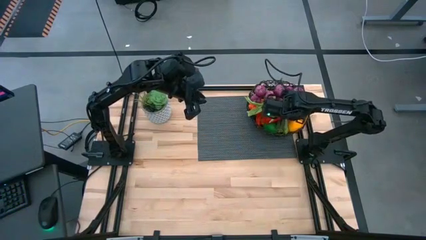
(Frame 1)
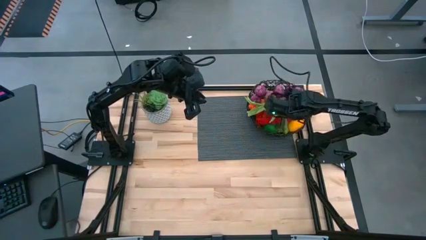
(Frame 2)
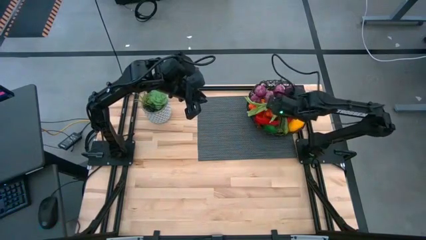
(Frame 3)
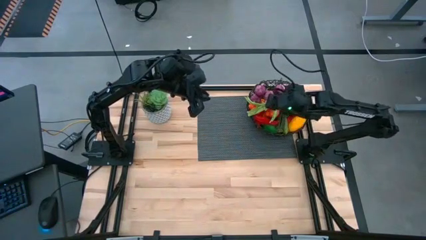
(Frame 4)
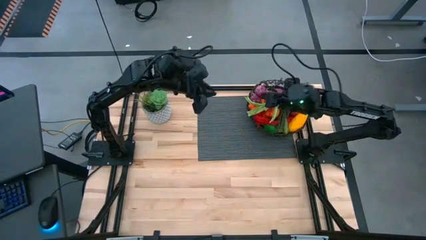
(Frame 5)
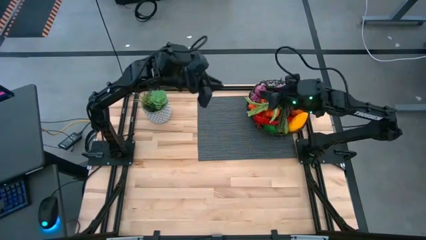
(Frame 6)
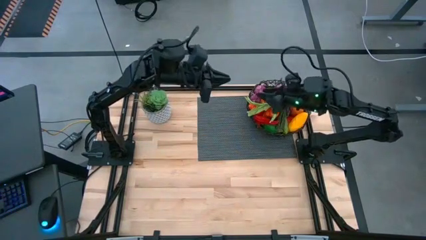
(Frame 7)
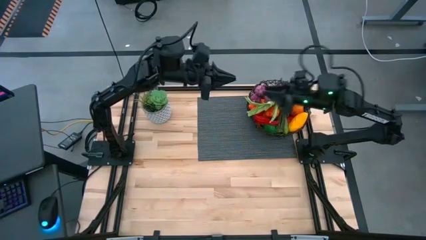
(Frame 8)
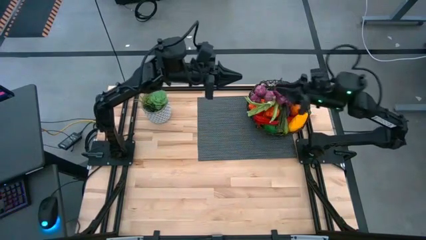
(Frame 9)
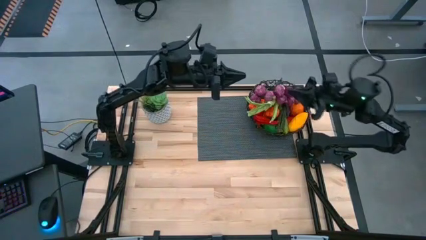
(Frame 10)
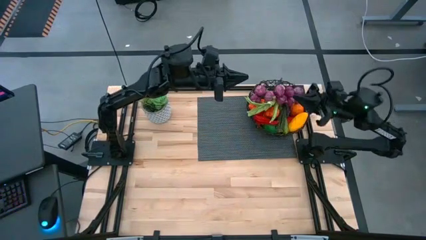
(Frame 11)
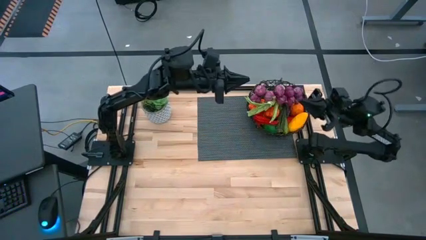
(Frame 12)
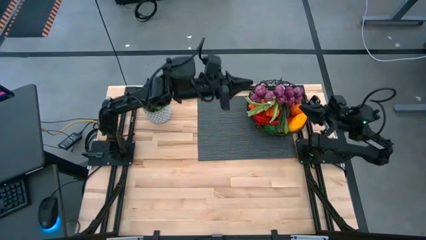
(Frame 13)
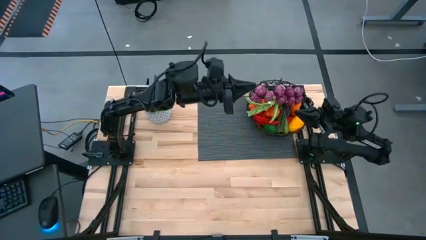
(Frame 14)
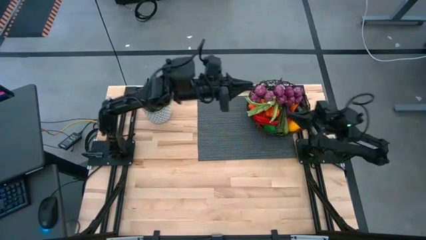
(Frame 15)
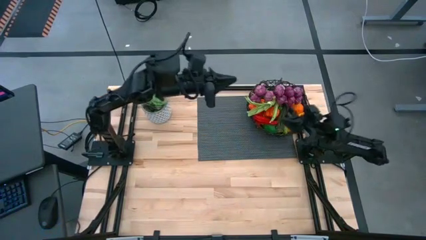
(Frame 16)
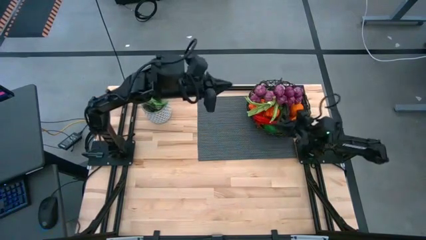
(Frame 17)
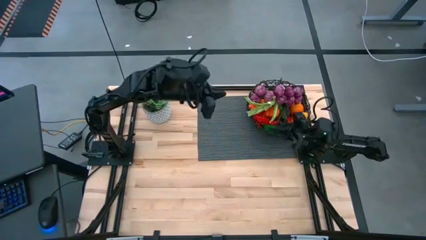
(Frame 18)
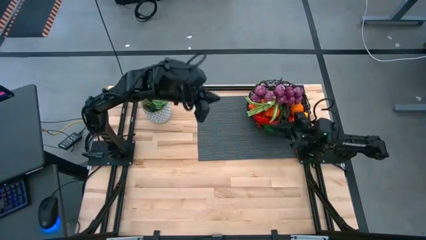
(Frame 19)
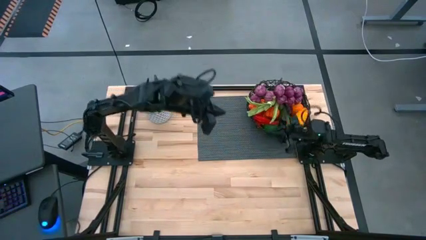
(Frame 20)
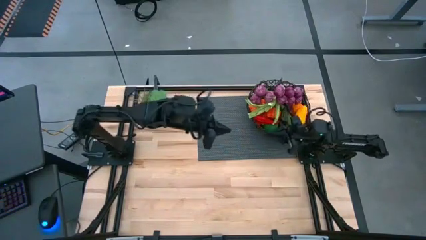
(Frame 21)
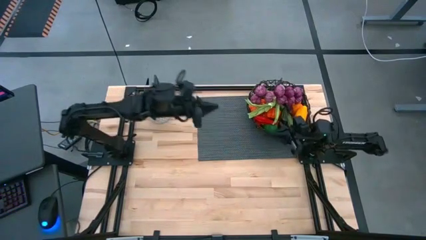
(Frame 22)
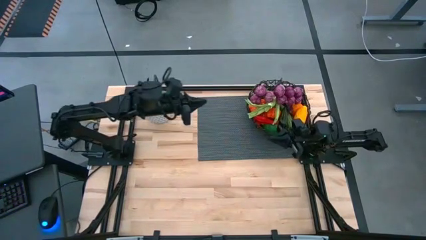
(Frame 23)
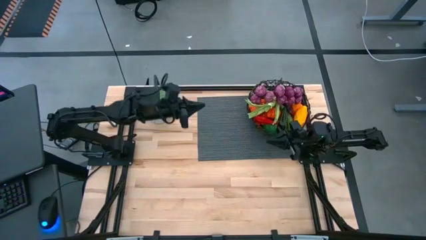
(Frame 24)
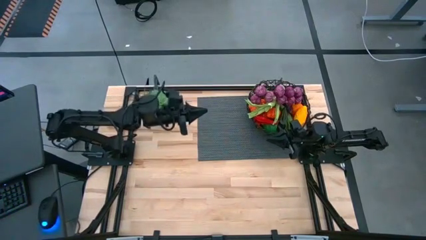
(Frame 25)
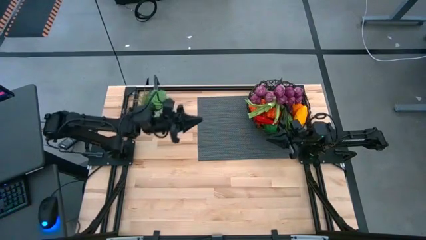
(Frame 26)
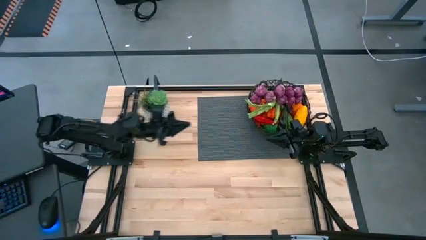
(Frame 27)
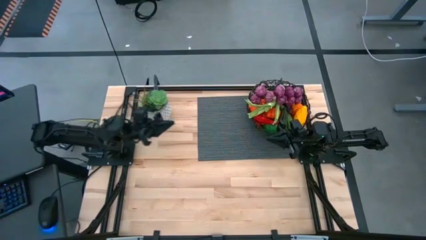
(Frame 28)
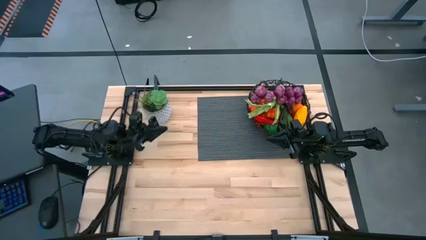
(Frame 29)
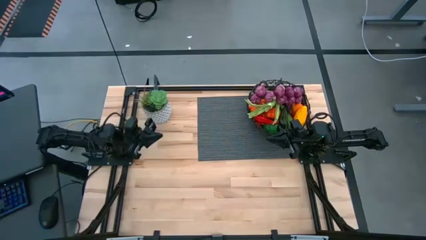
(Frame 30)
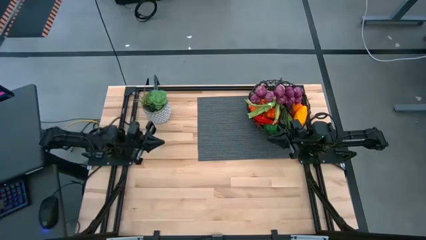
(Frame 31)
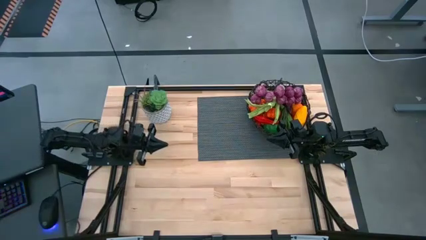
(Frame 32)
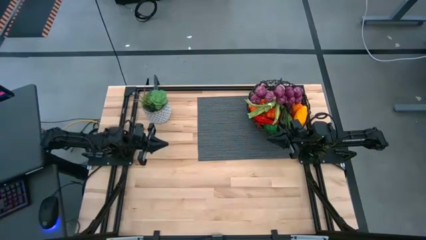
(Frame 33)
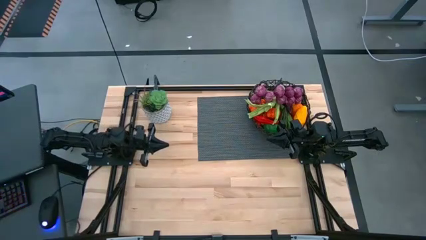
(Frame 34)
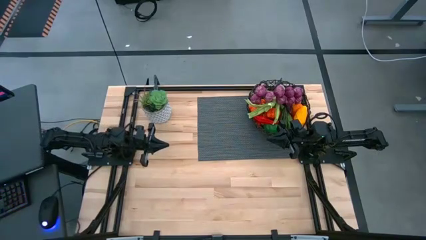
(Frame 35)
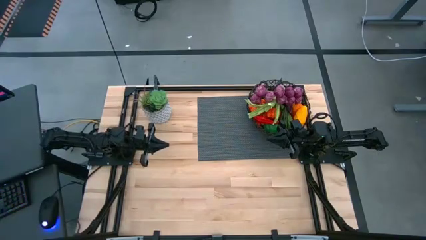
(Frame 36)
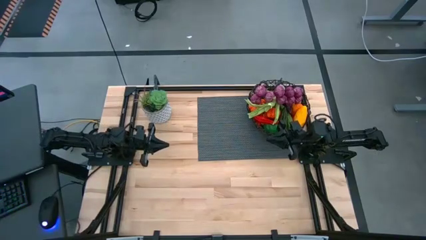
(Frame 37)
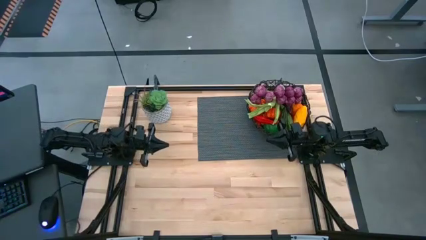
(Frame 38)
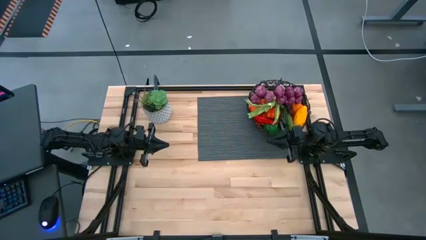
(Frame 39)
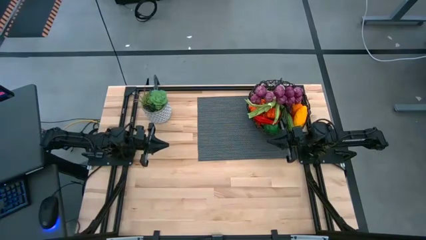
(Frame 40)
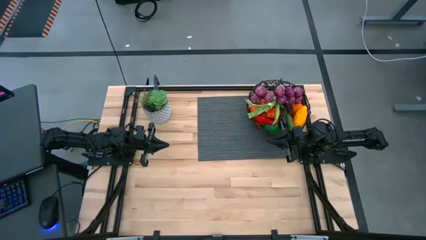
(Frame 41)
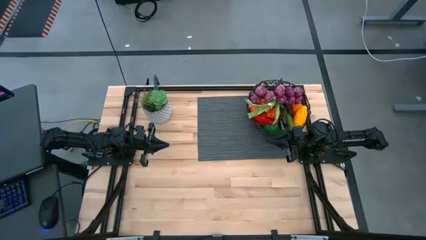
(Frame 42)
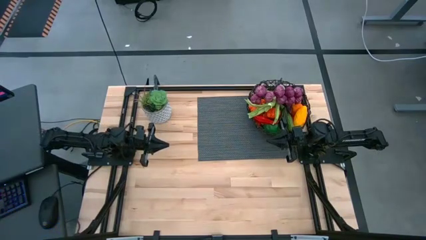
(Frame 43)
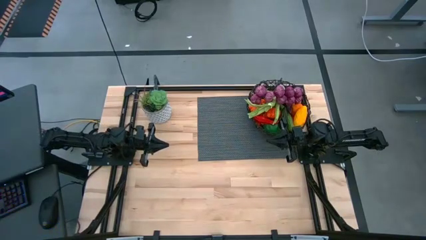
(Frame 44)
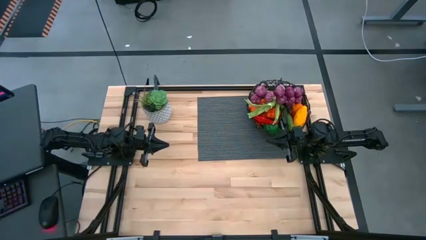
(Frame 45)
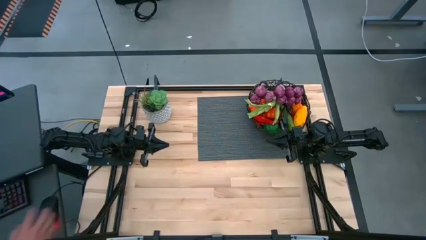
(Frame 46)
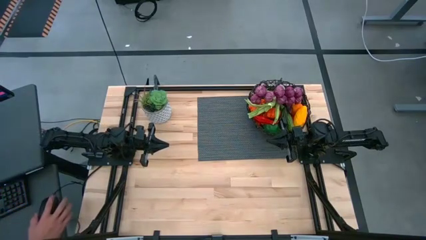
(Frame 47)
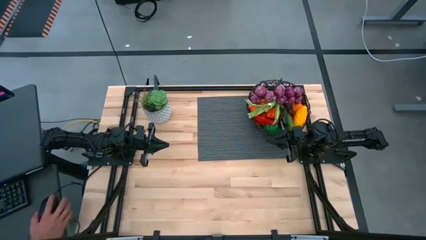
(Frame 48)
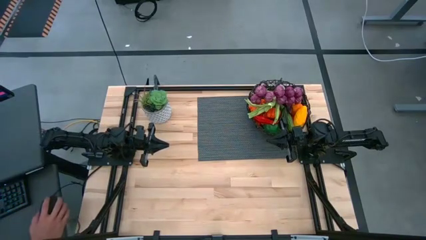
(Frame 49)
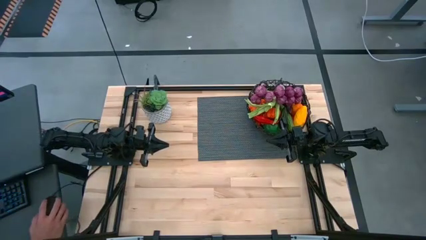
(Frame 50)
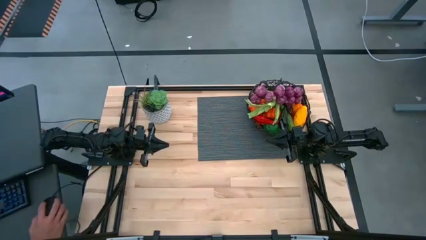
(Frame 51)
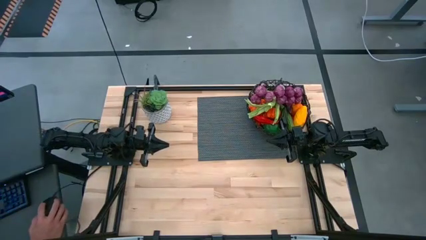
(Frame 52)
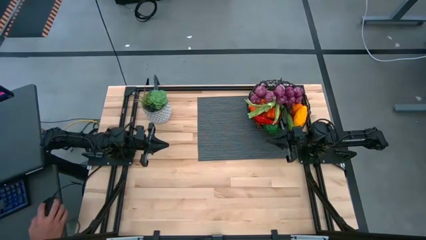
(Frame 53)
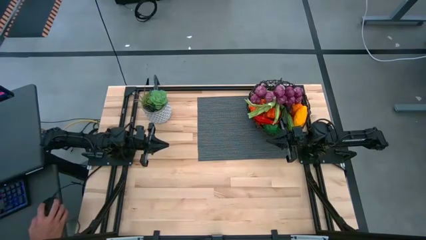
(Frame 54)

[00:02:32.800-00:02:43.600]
Task: Build produce basket
Return to Home Position

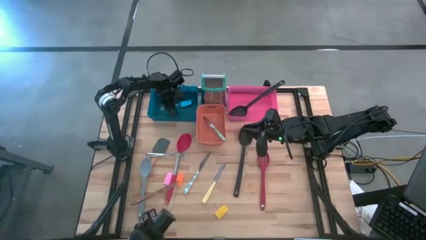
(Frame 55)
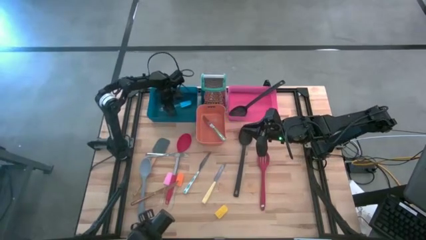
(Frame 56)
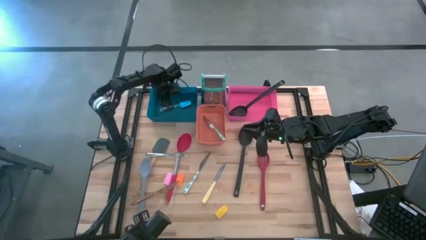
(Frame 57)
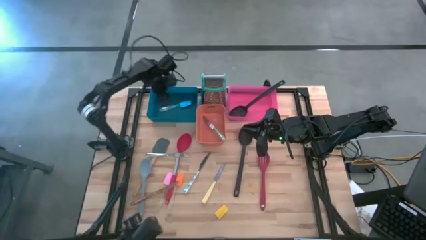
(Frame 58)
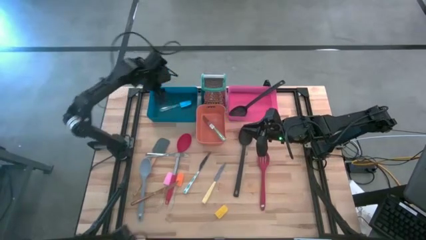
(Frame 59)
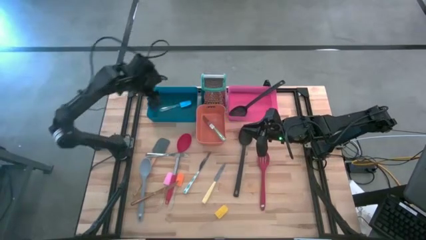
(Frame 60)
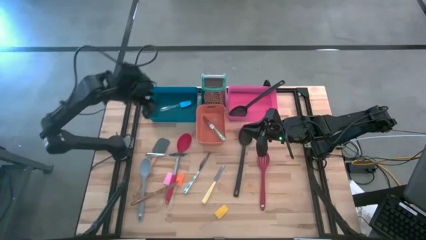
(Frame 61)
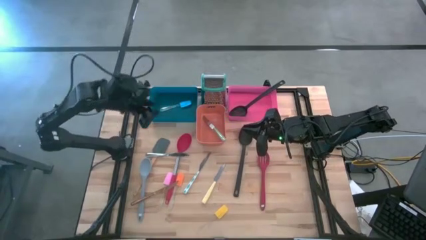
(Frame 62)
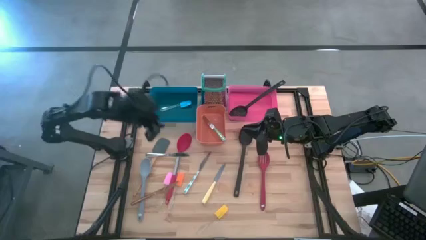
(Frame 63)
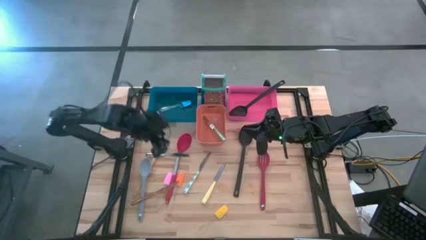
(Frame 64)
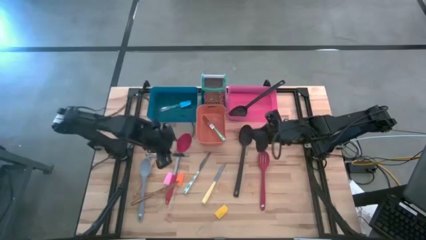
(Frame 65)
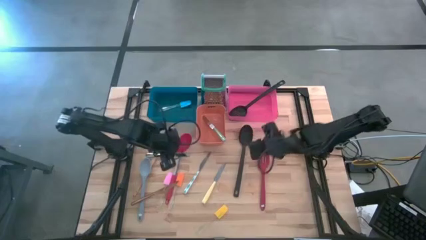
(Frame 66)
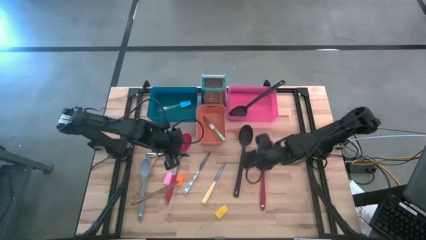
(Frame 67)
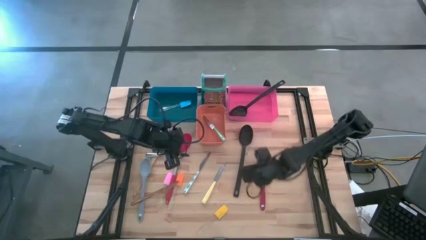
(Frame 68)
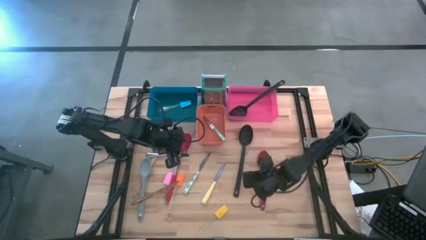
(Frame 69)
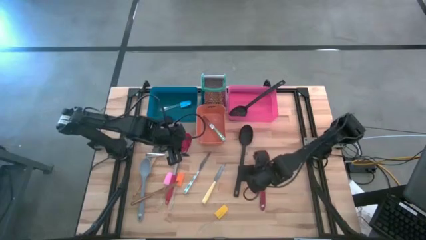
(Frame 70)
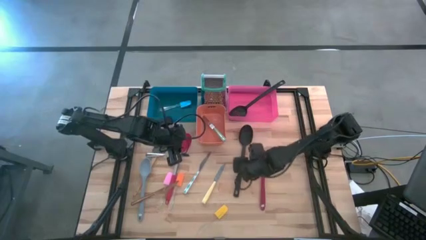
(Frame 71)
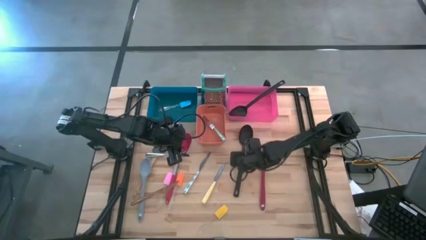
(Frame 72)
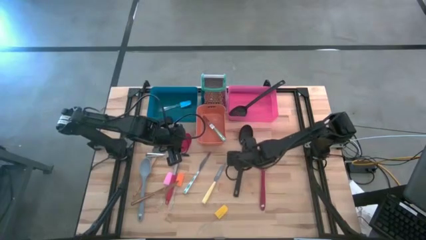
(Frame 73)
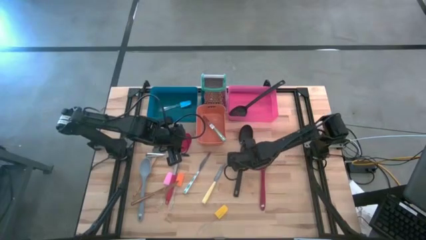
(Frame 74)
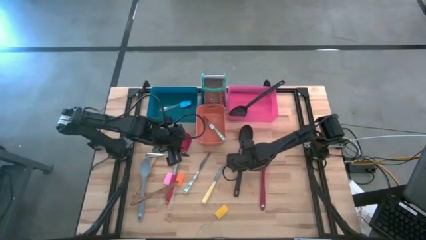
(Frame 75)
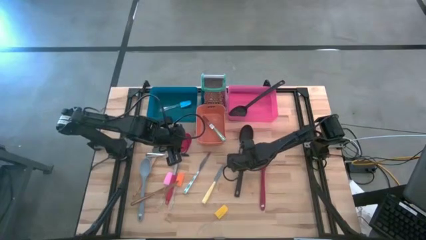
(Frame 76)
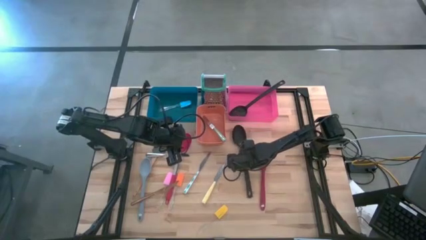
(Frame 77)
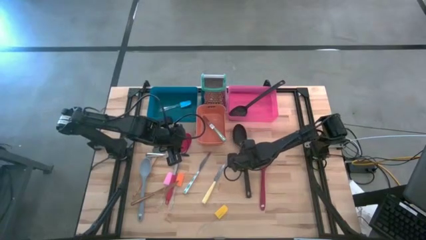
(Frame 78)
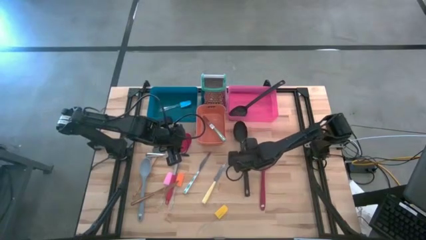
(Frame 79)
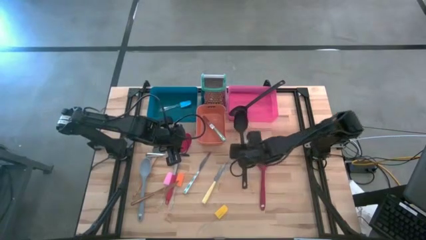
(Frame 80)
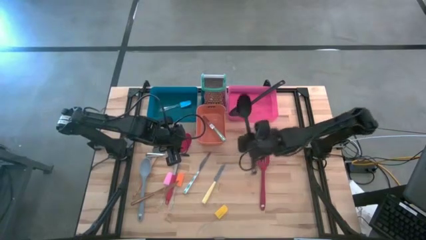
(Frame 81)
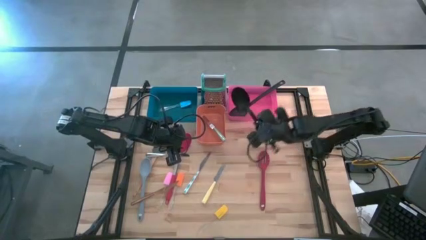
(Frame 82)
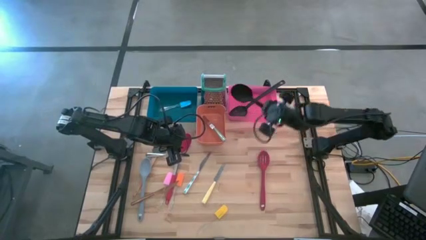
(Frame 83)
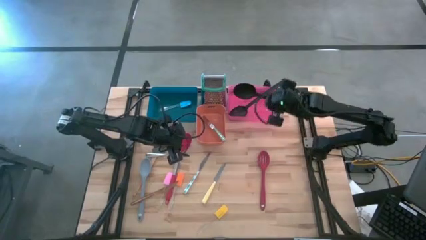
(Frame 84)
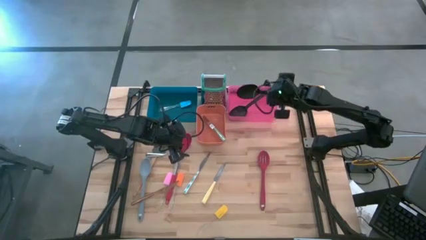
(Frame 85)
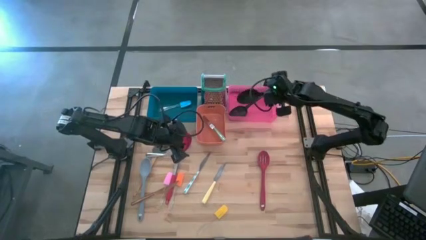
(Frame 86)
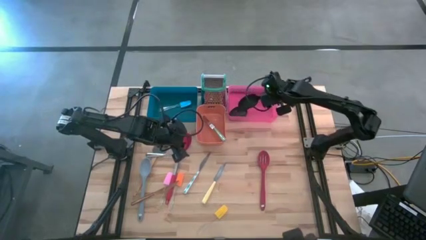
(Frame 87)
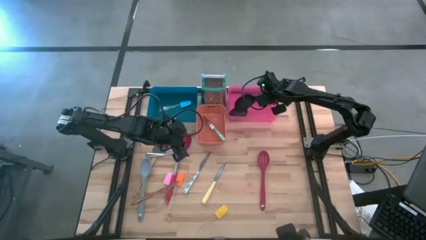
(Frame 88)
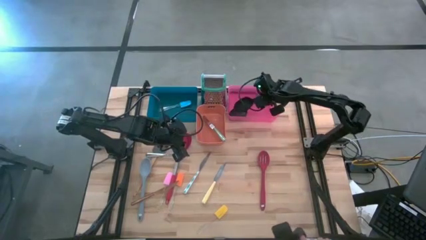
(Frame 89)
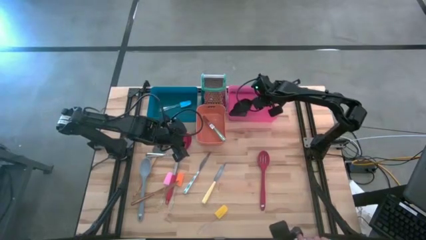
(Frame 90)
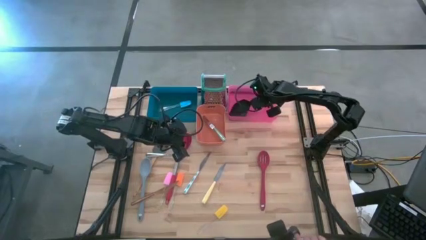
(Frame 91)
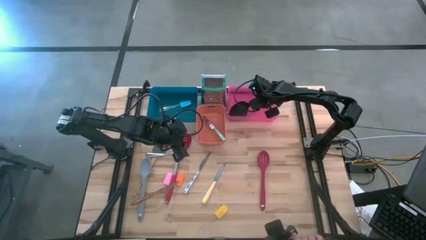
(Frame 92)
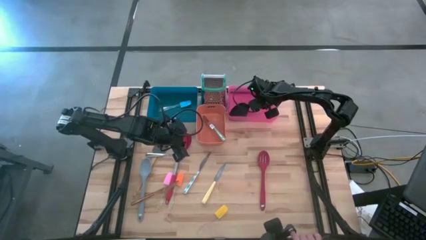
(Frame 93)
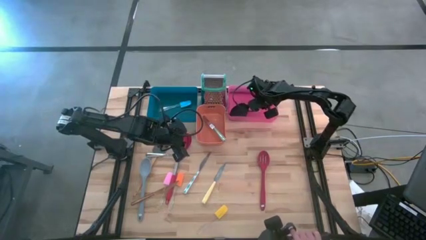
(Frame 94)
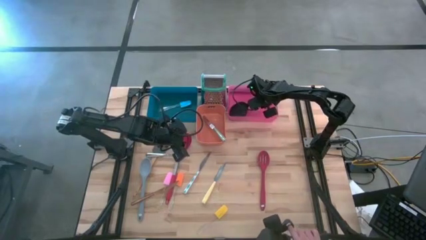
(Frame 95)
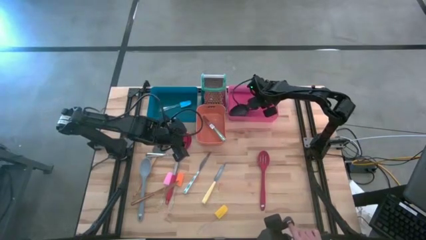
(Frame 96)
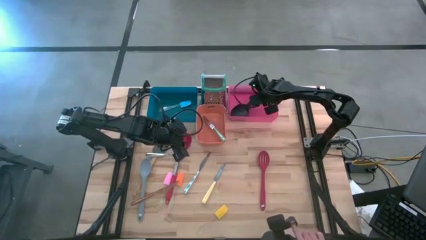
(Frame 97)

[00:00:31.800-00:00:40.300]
Task: Pick & Place Kitchen Items
Put the black serving spoon into the pink bin
